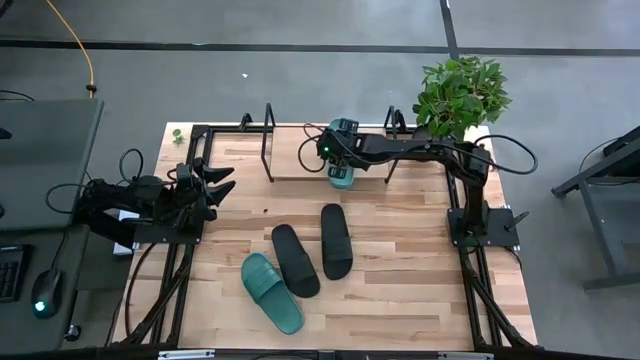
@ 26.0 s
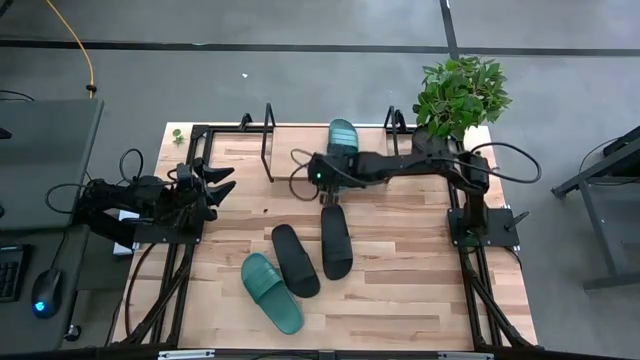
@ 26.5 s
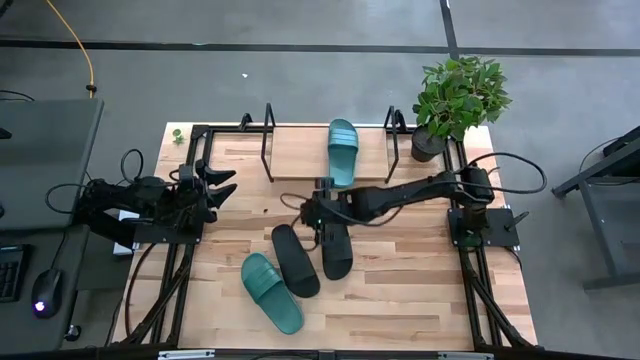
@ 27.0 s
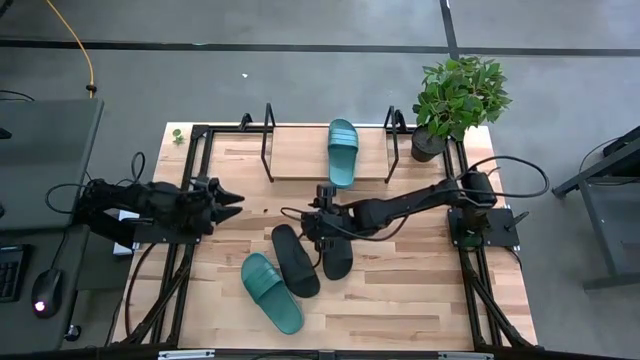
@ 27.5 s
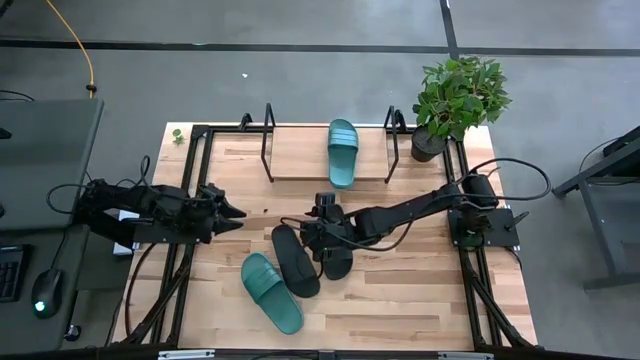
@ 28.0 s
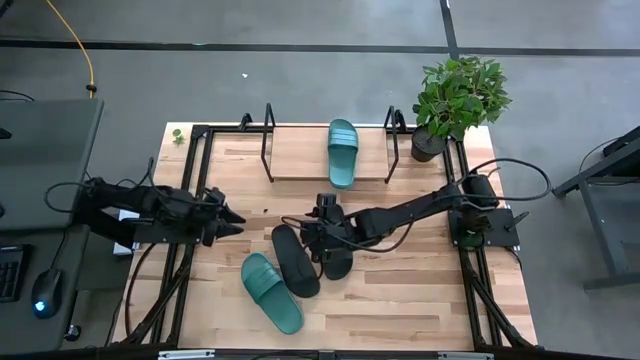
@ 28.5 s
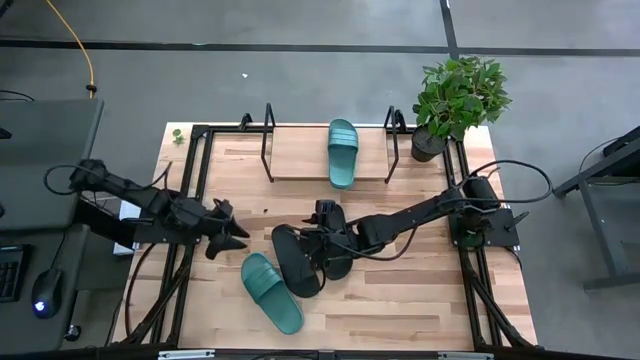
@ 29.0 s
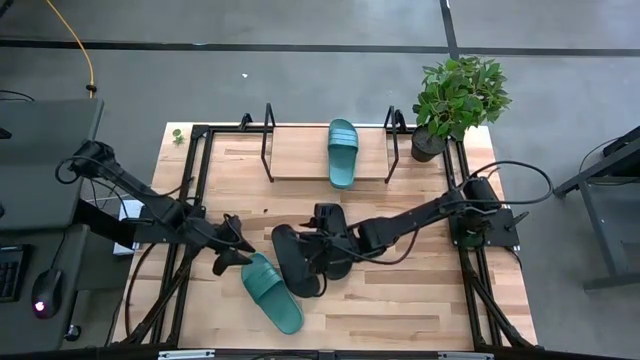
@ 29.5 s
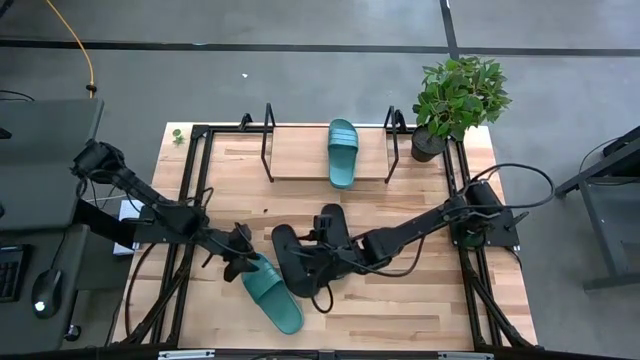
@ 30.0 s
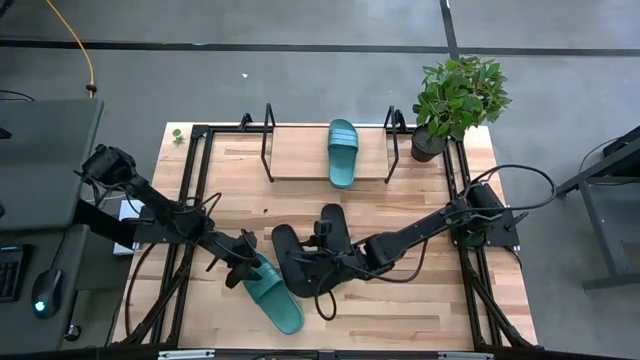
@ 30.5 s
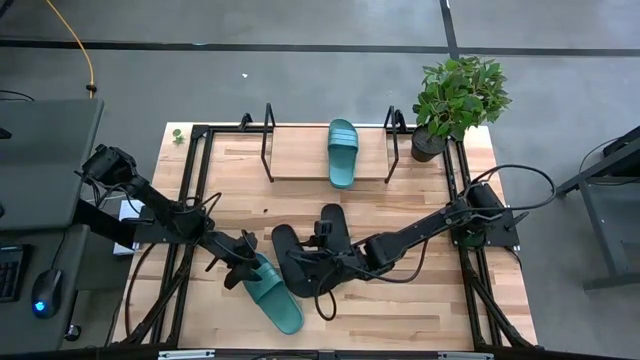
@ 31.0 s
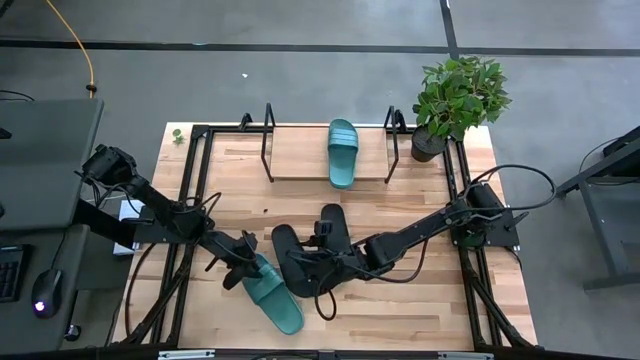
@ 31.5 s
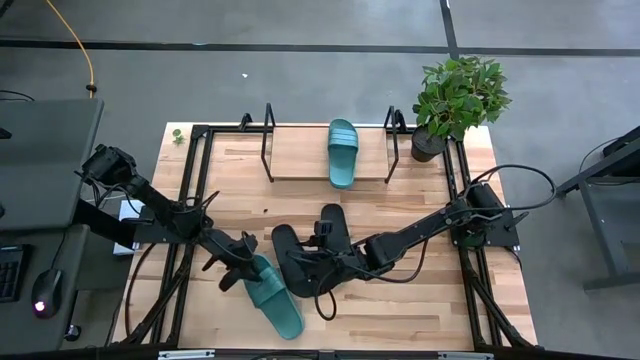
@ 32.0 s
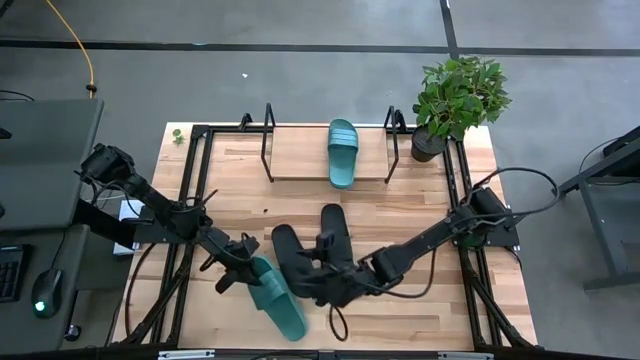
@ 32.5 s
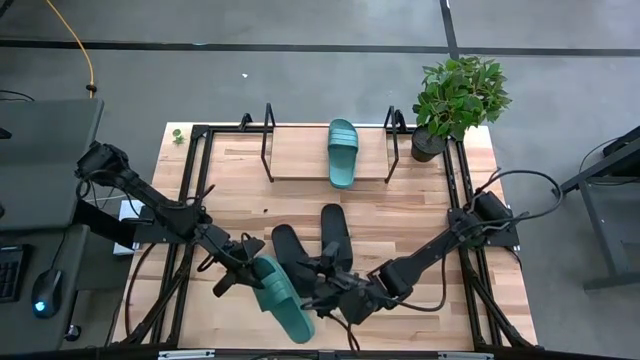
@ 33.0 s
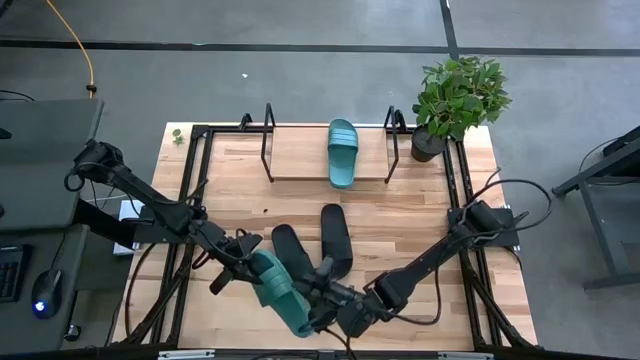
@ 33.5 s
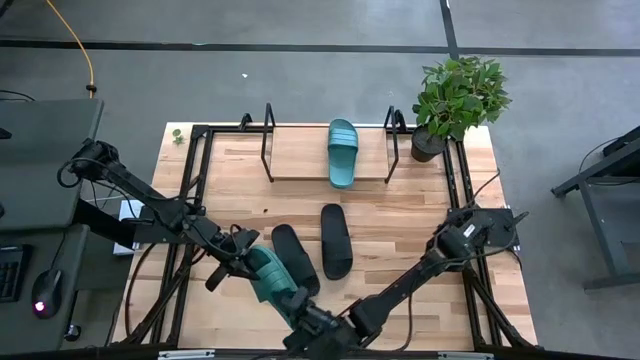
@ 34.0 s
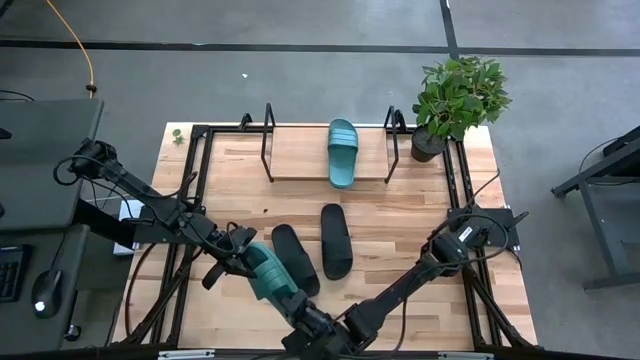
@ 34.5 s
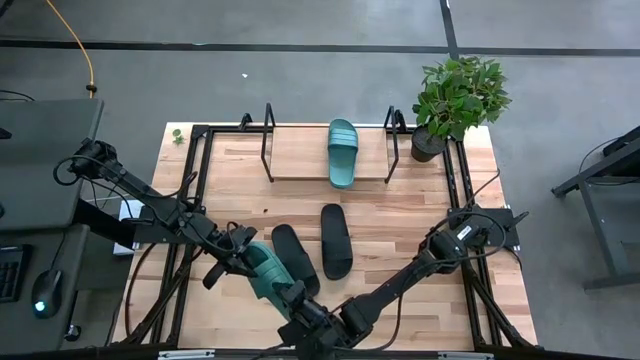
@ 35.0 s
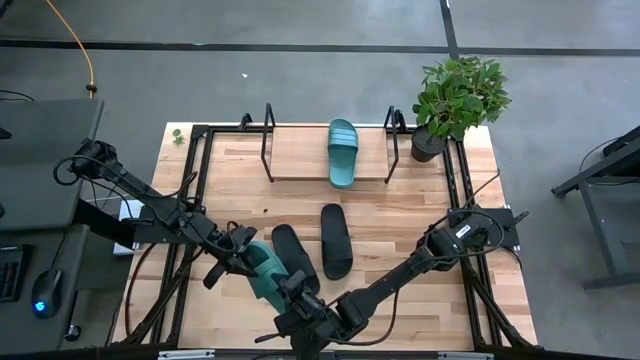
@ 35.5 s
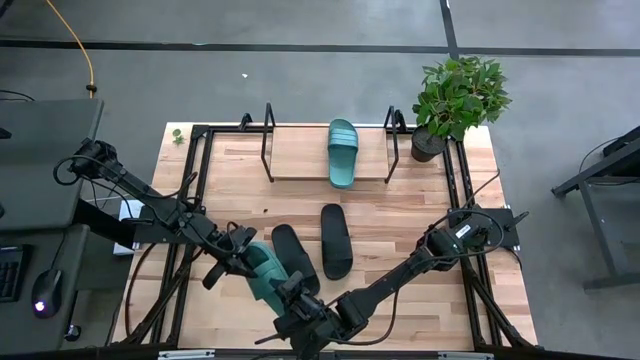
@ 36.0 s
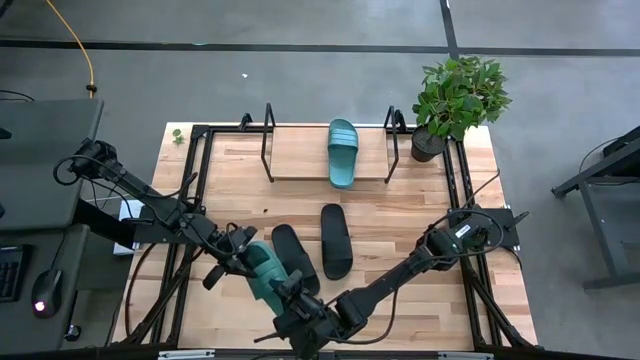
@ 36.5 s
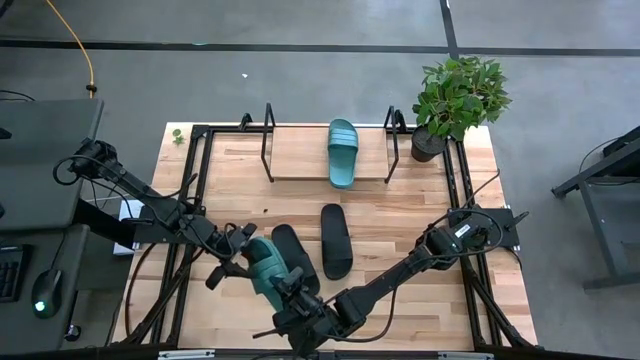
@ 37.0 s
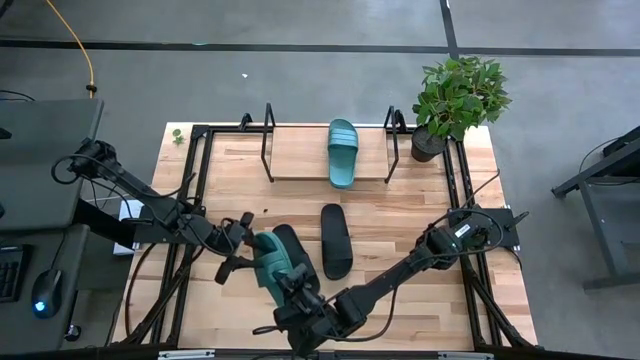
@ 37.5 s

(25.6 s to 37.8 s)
Task: Pick and place slides into the shelf
Put the green slide on the shelf

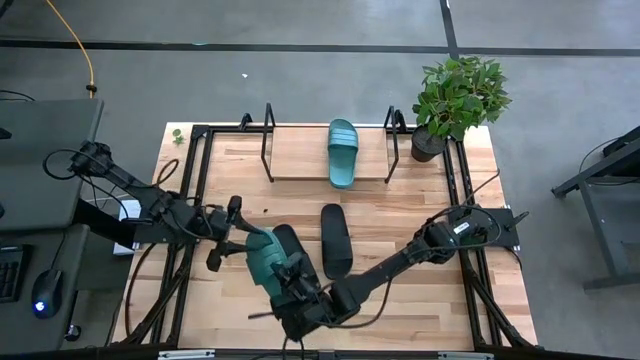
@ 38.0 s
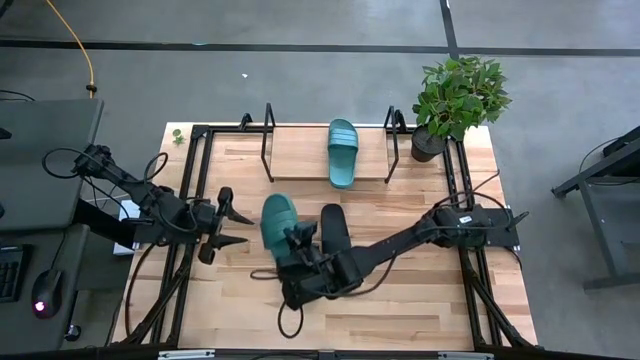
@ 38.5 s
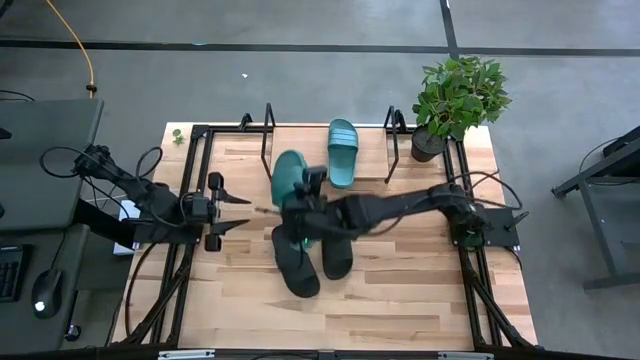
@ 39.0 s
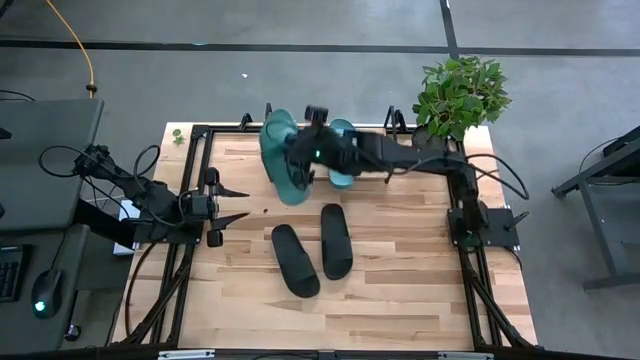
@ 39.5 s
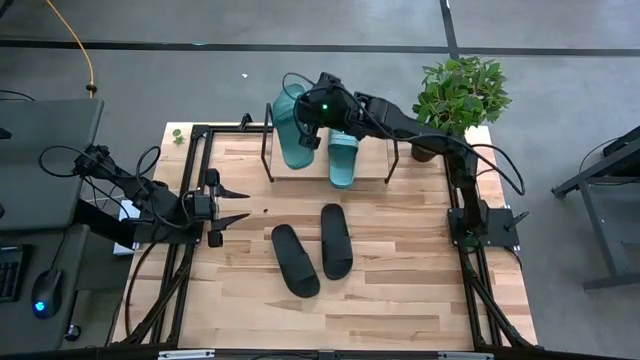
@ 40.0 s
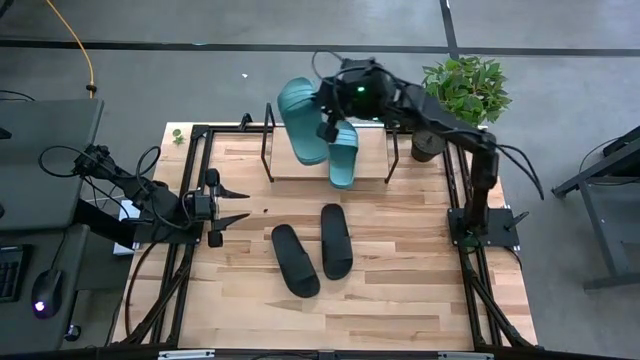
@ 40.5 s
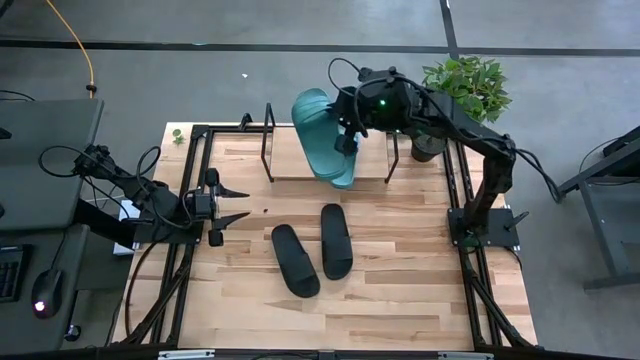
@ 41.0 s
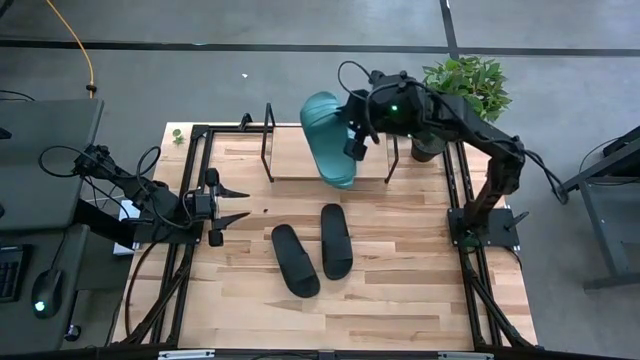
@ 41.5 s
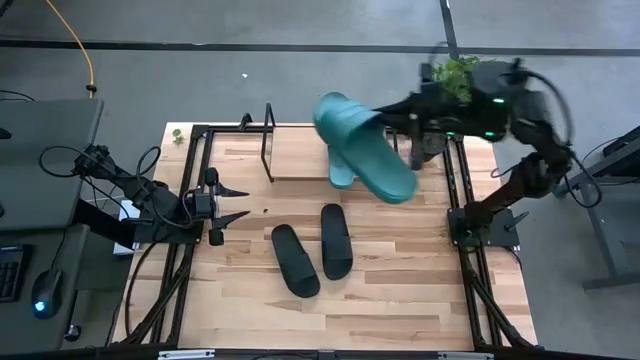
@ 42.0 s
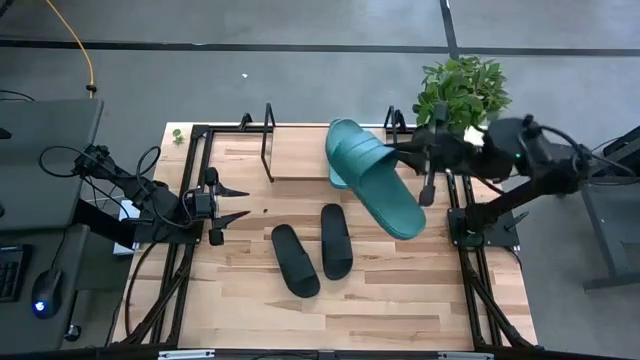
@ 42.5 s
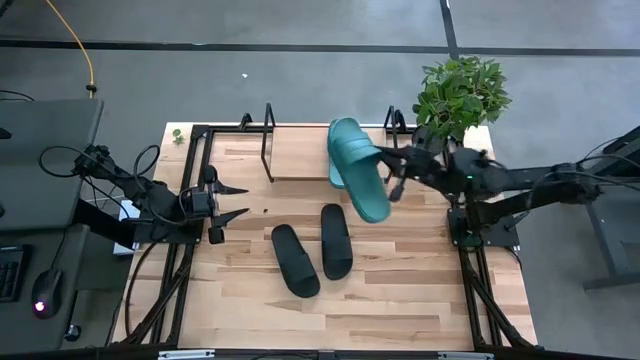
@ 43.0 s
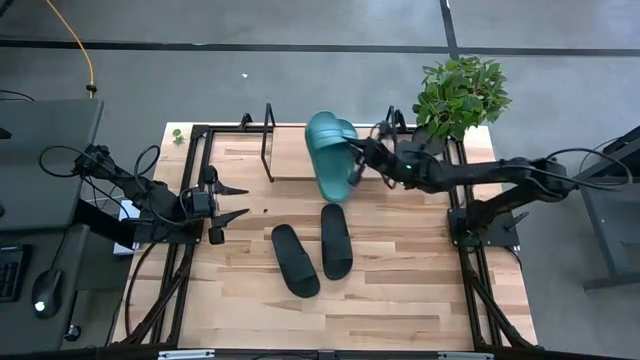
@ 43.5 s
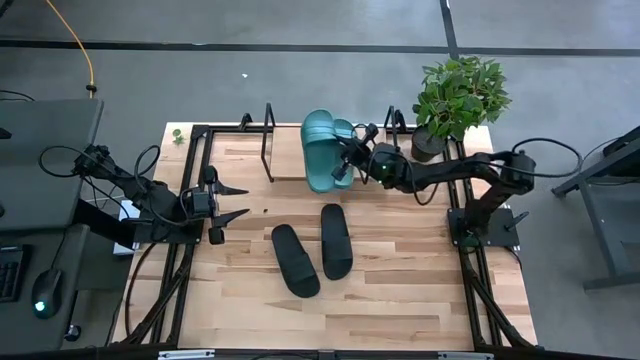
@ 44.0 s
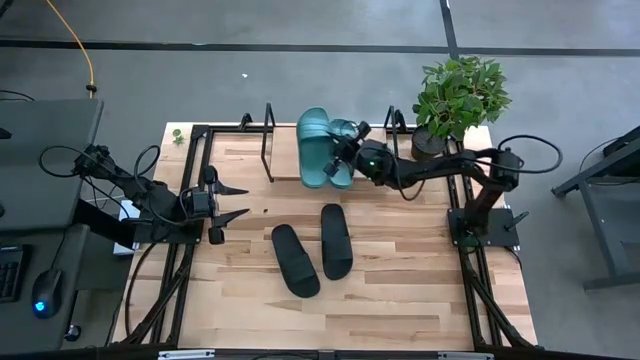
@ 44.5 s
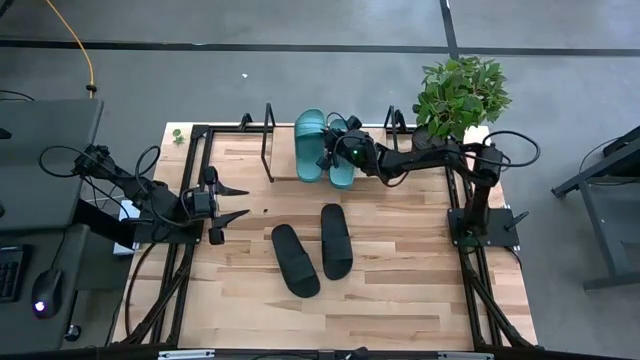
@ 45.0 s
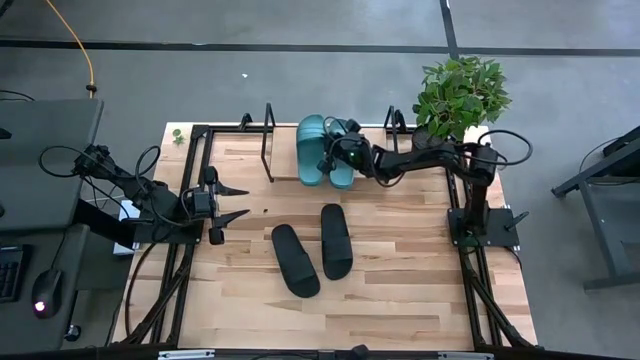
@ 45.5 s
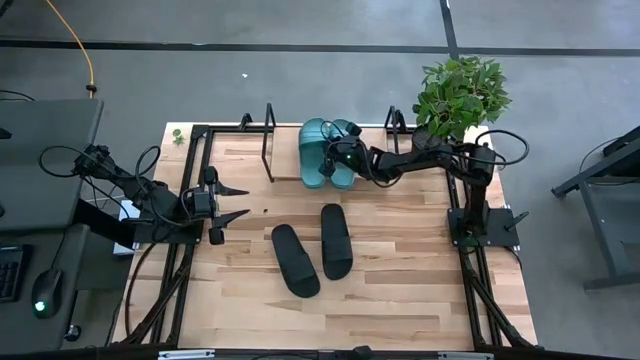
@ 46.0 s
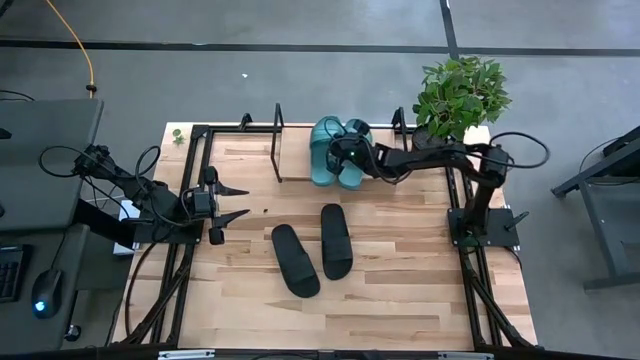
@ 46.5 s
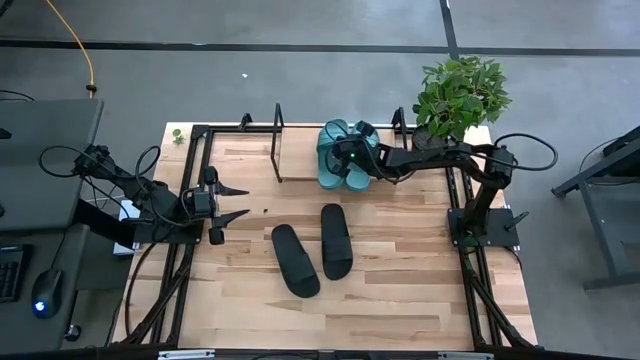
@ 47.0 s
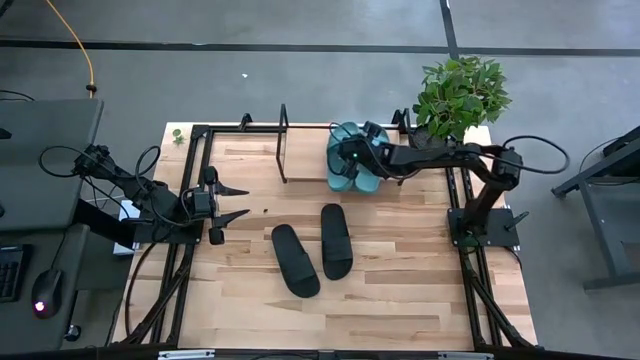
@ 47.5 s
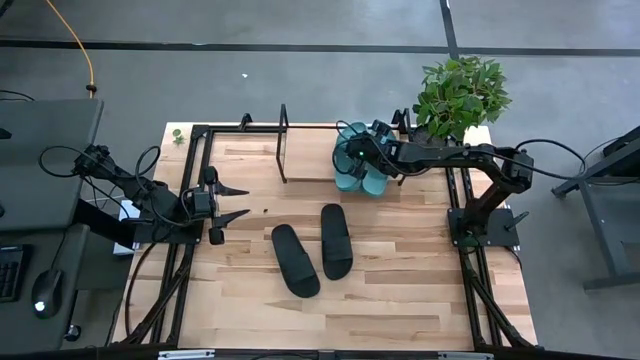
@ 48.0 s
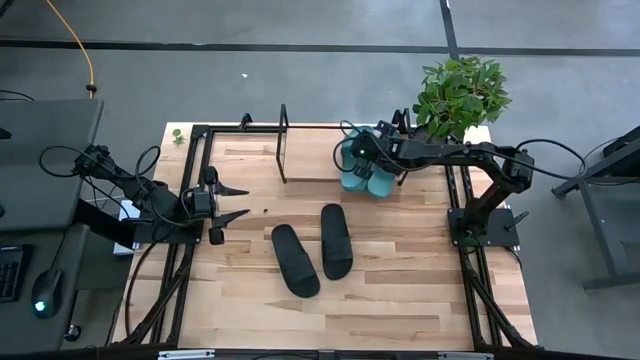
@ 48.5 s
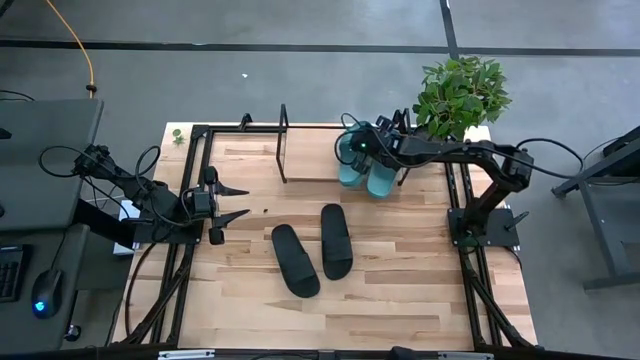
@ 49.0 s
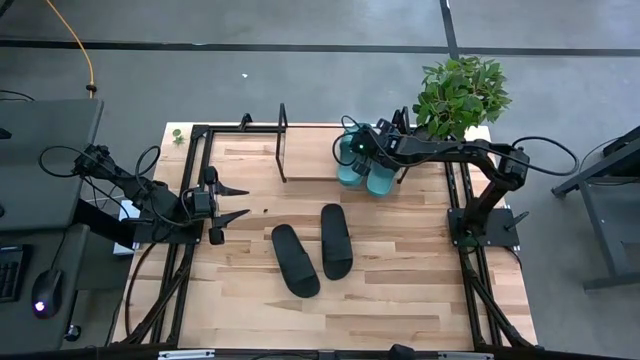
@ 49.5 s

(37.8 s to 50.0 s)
Put the green slide on the shelf
